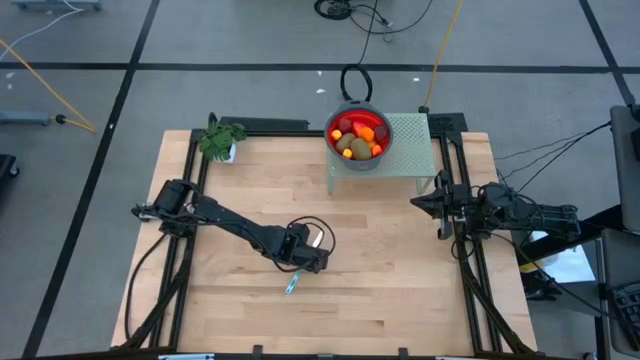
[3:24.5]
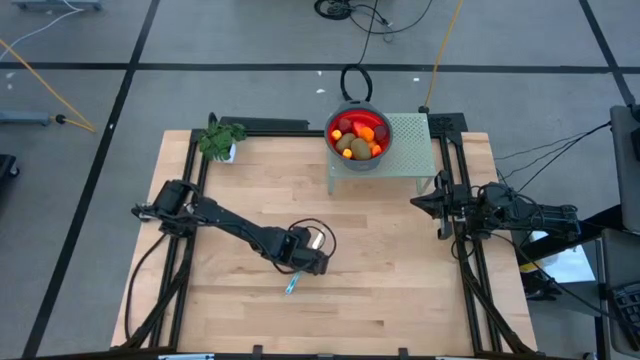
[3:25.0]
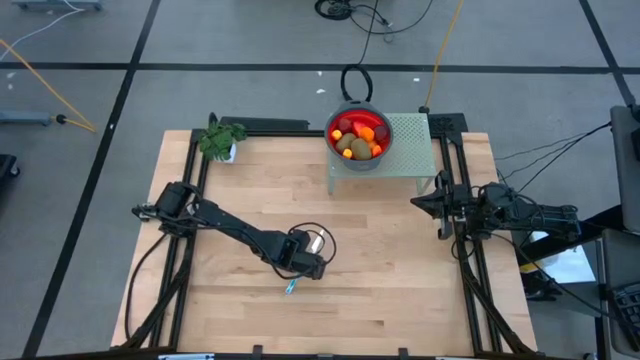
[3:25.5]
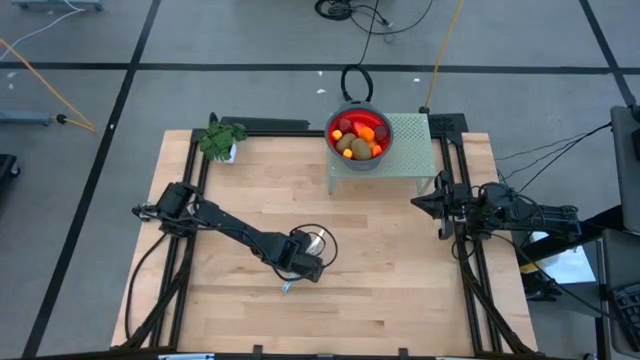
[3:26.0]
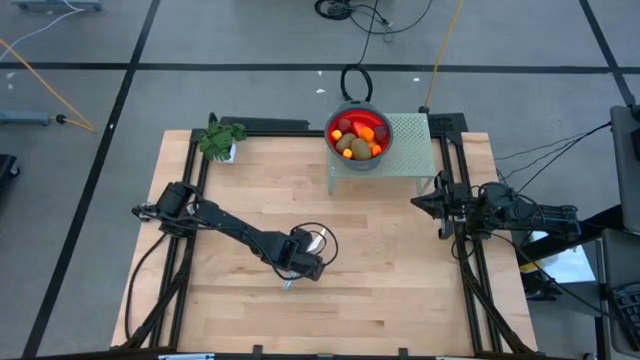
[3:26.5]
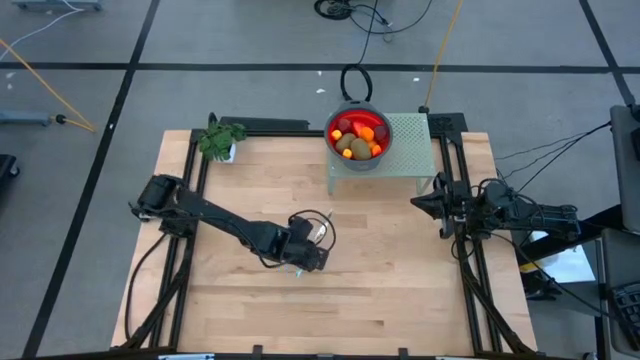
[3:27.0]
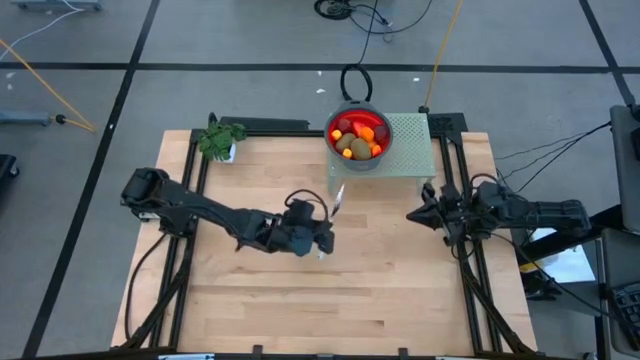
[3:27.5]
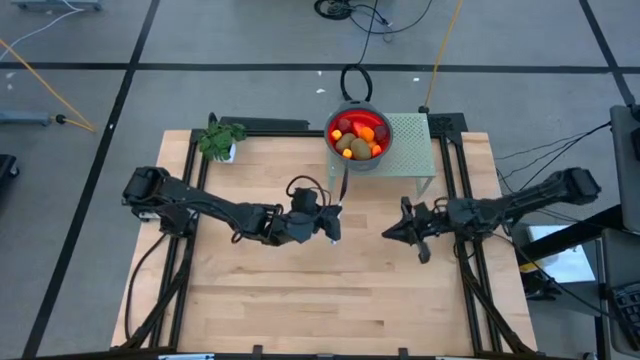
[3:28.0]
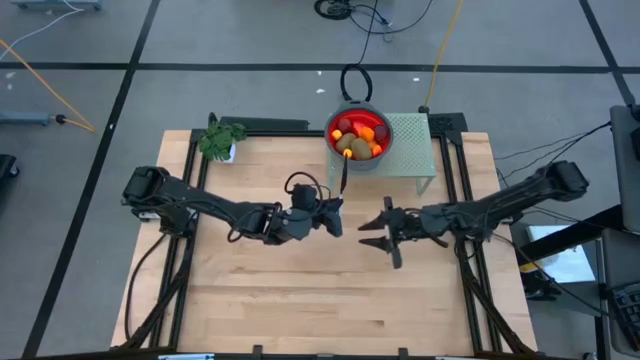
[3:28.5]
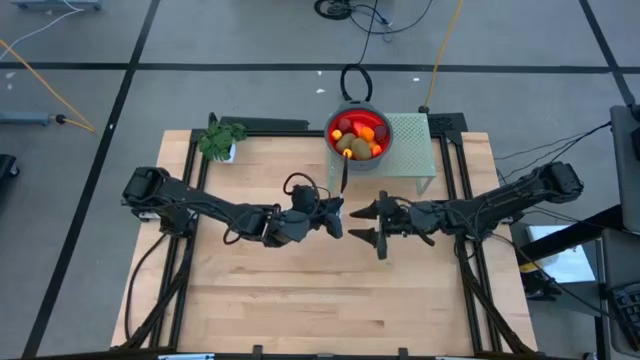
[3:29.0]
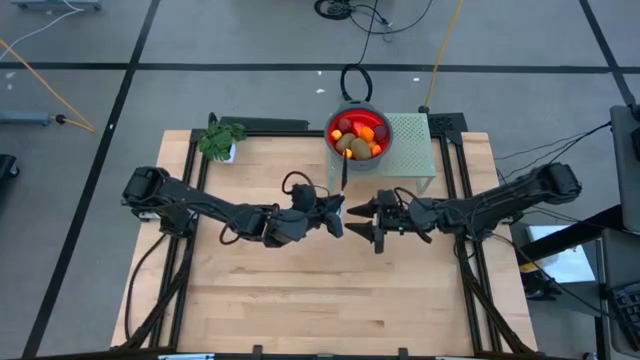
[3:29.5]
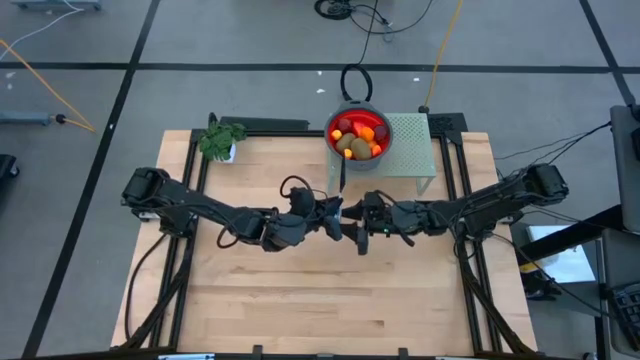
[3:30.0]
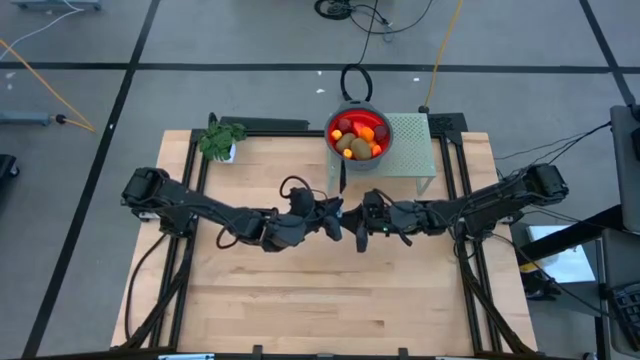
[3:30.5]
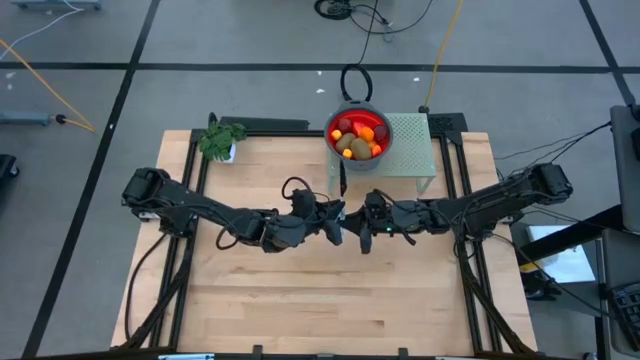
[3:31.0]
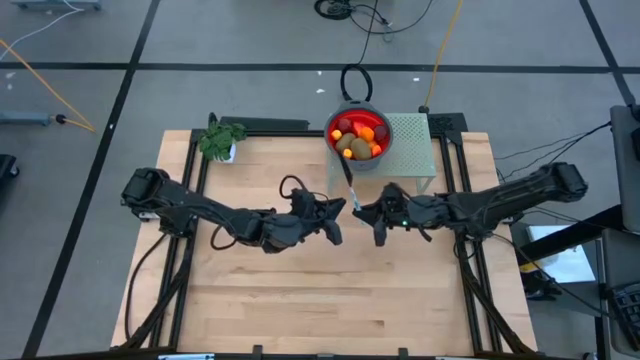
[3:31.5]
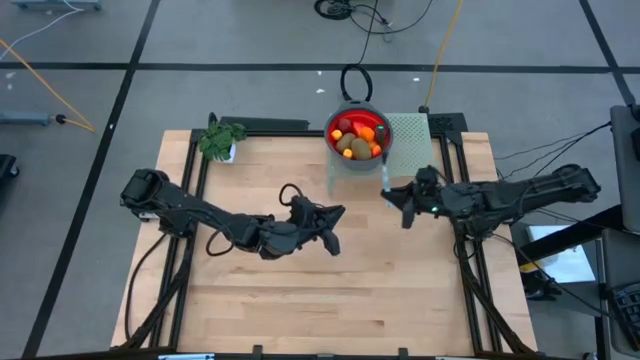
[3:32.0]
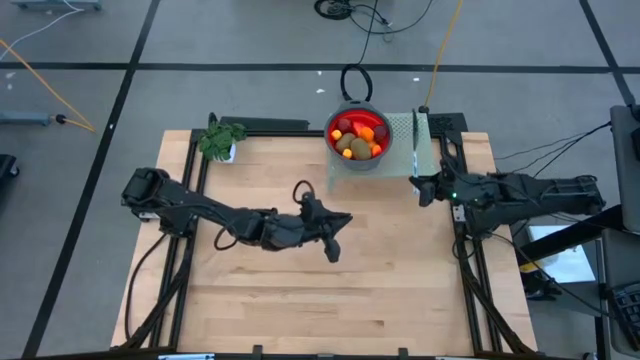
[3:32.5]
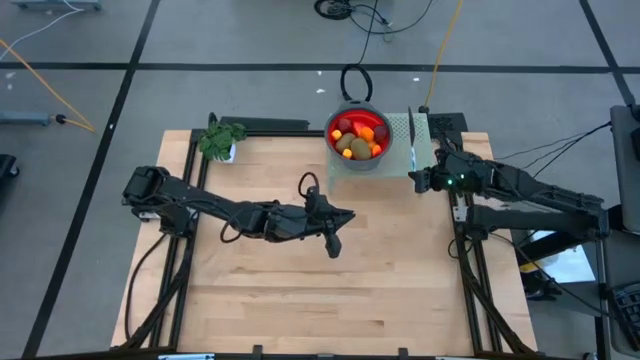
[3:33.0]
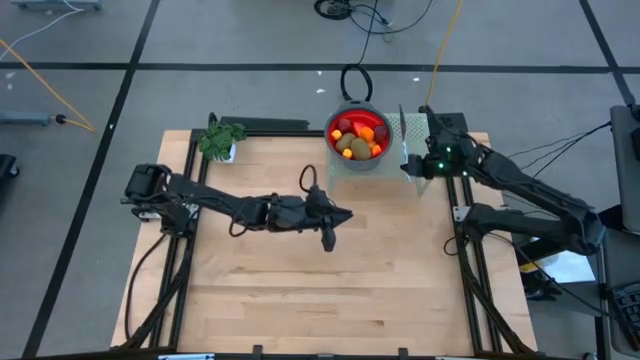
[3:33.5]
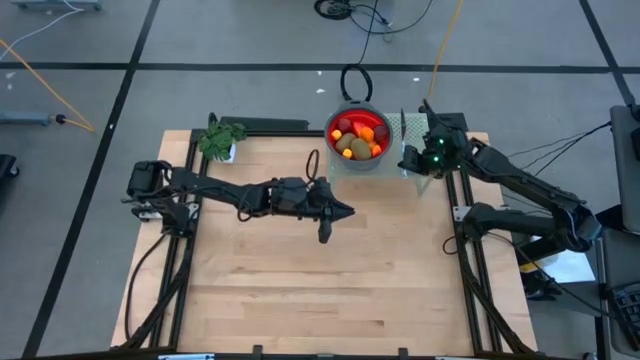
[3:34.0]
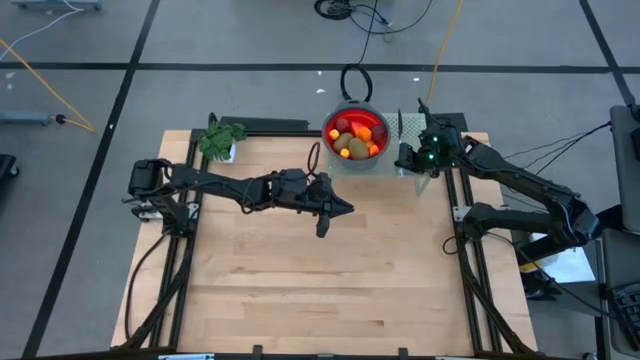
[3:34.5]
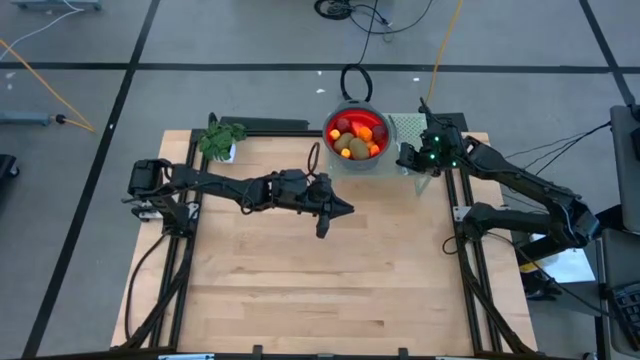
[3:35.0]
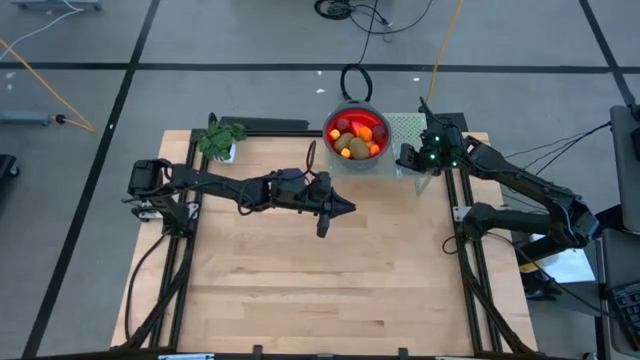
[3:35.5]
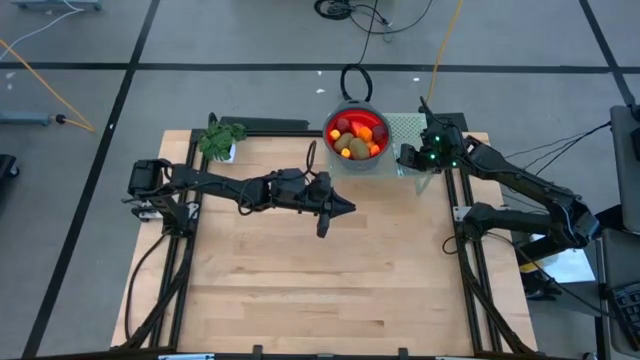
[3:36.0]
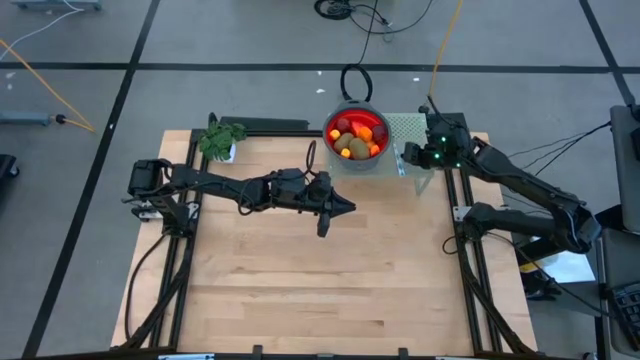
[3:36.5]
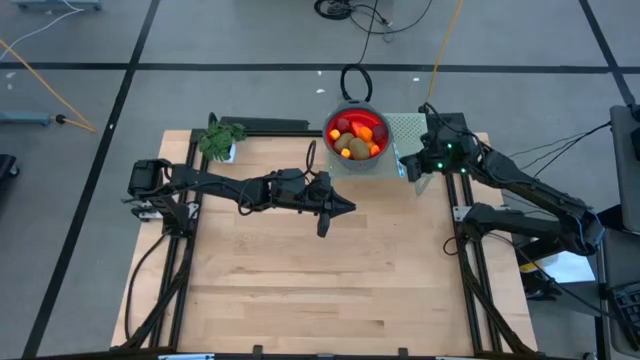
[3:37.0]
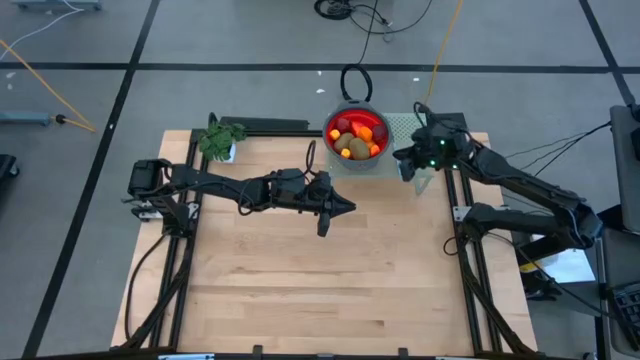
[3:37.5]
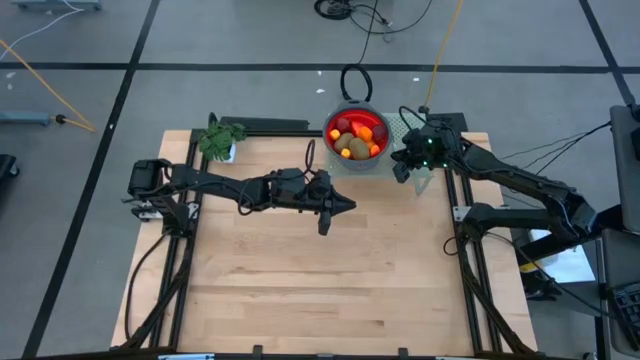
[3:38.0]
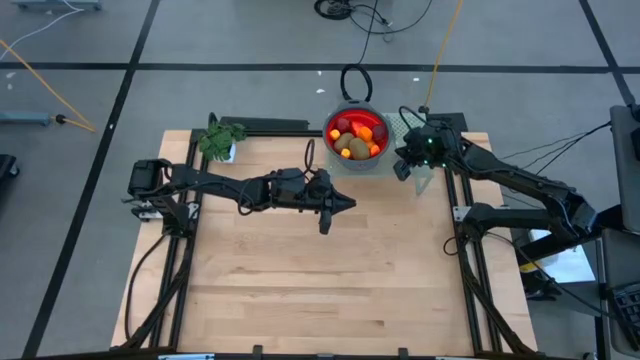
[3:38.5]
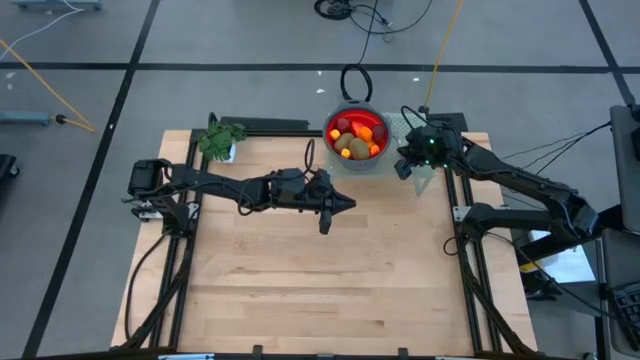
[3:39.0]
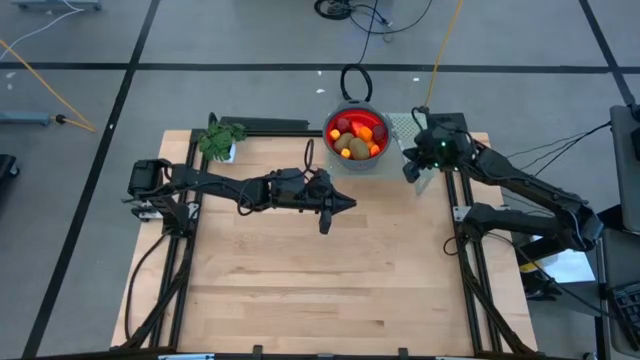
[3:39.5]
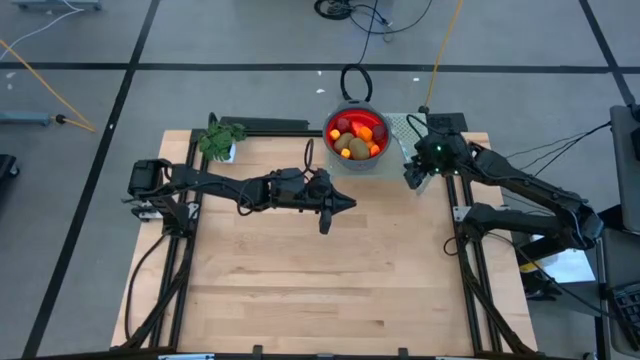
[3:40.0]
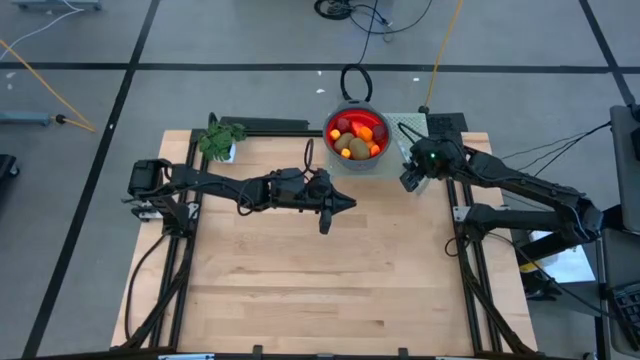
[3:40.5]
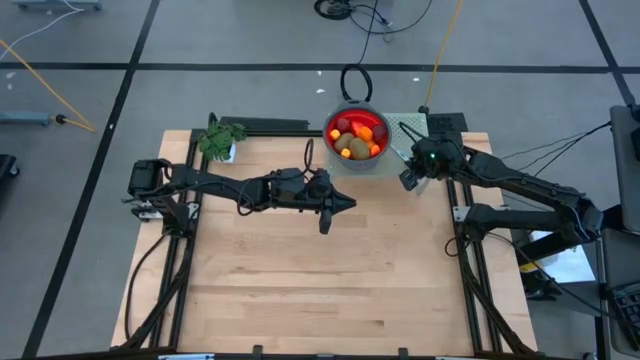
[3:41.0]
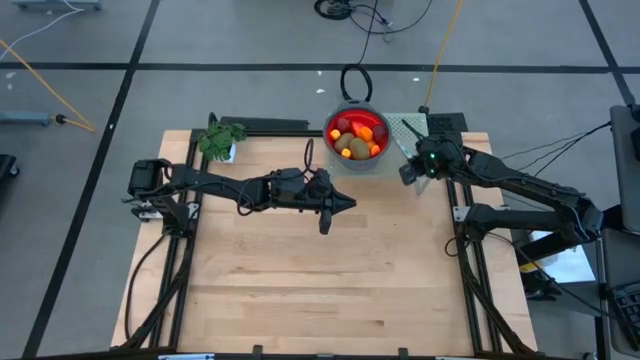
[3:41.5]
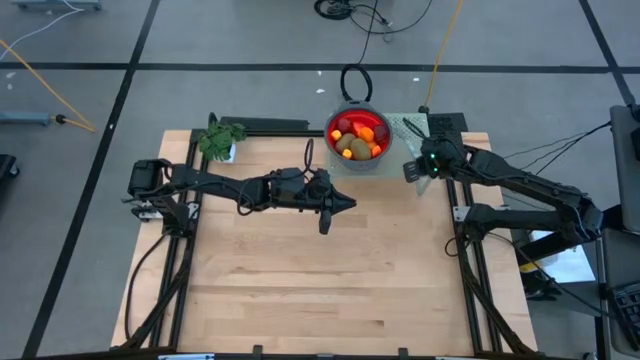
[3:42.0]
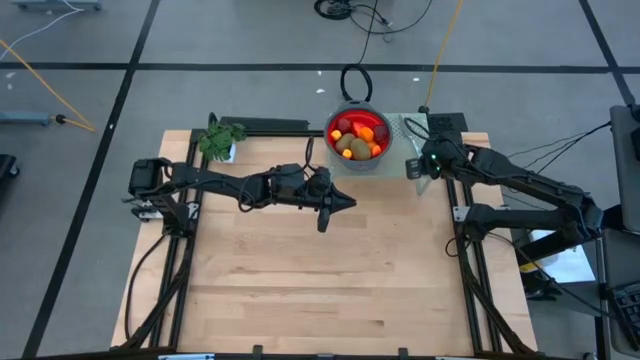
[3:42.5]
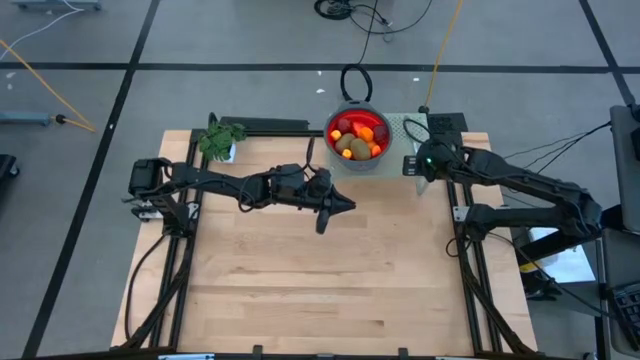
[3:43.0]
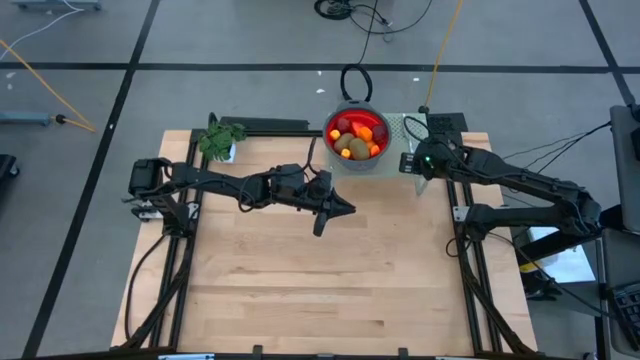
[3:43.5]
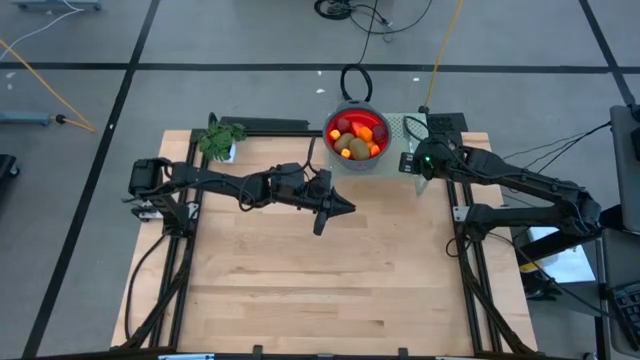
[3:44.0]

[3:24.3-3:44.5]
Task: Pick & Place Fruit
Put the white table knife on the shelf

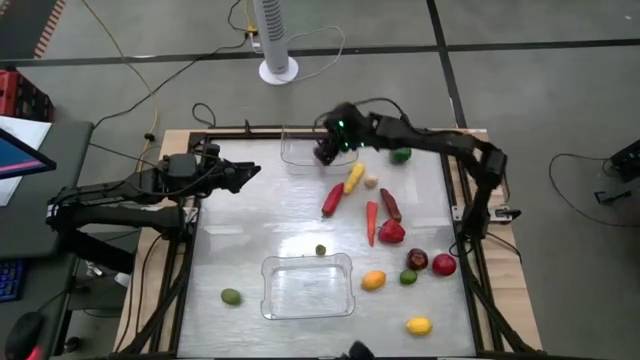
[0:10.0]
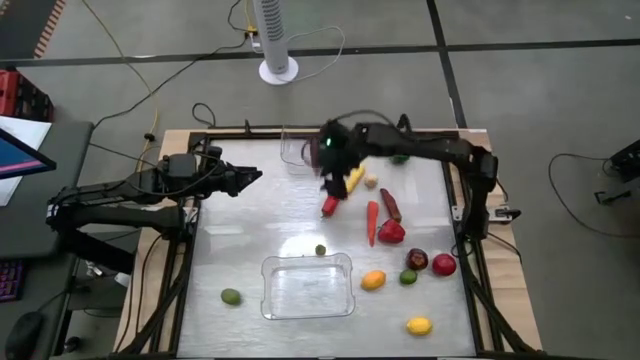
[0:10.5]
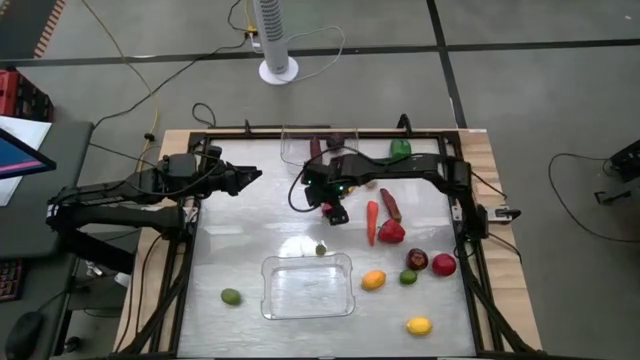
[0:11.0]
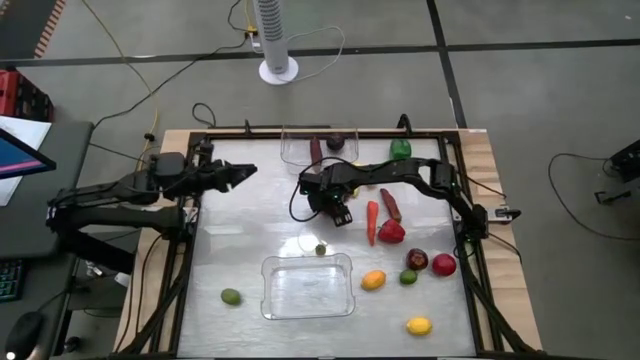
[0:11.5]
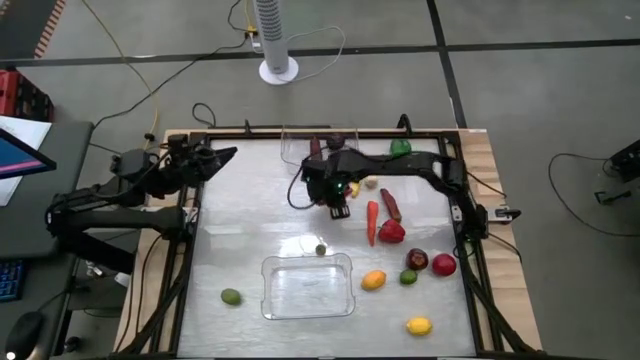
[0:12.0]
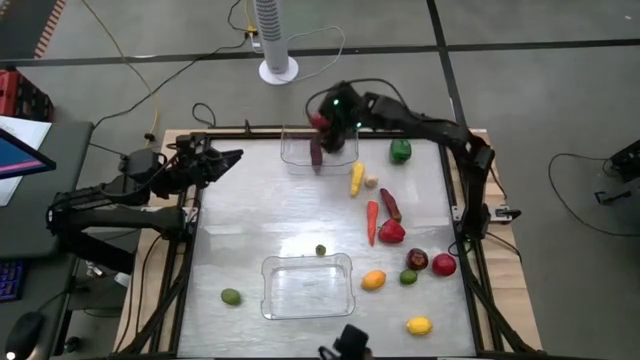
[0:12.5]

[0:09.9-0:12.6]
Task: Sort produce into baskets
Put the red chili pepper into the top transparent bin
